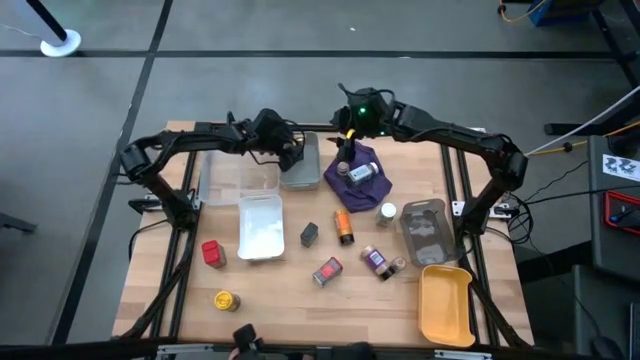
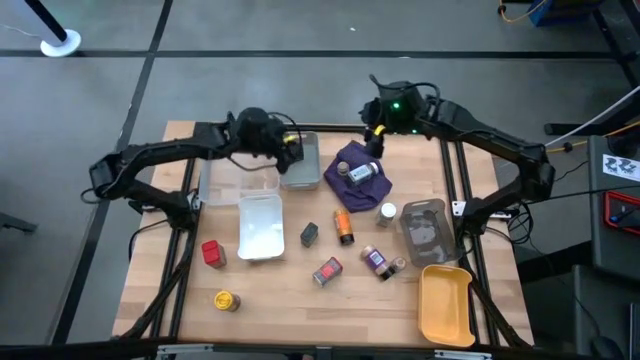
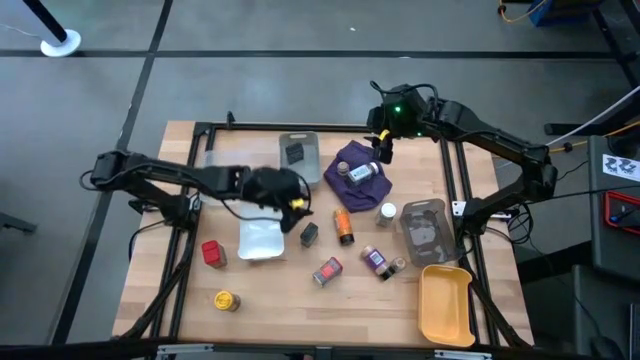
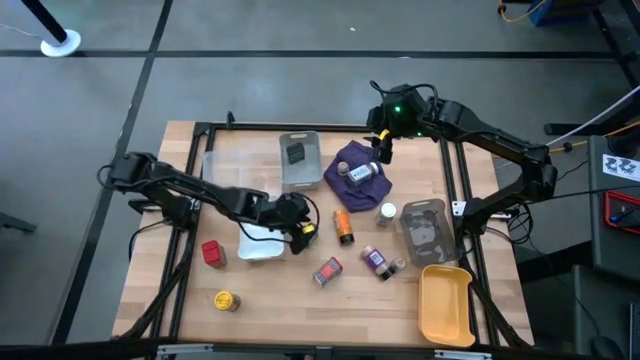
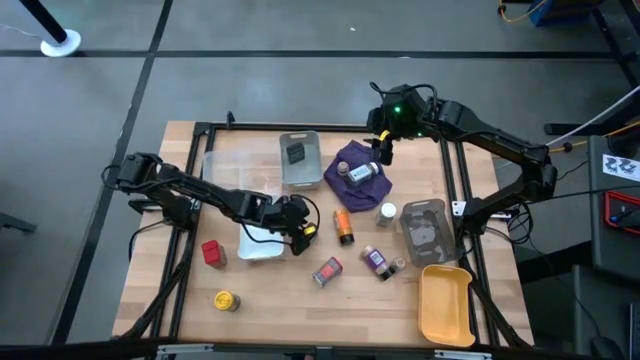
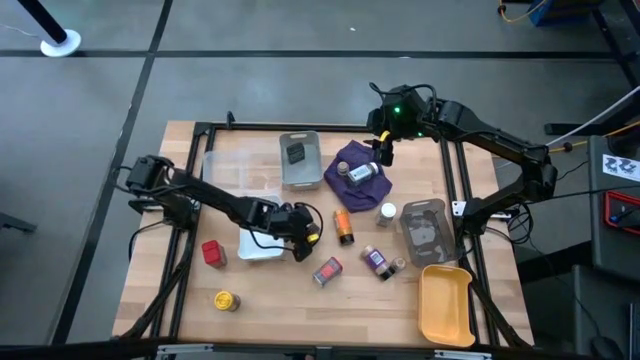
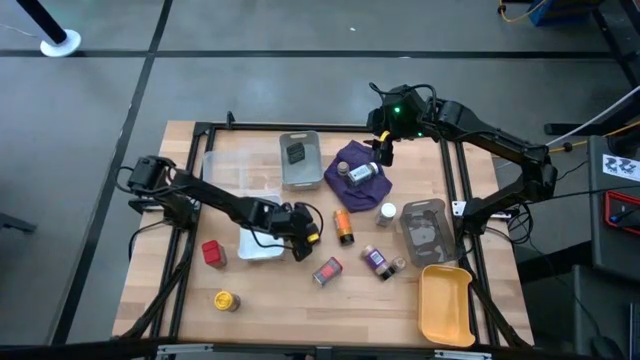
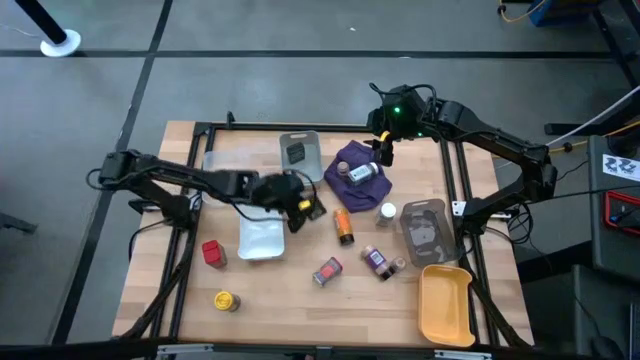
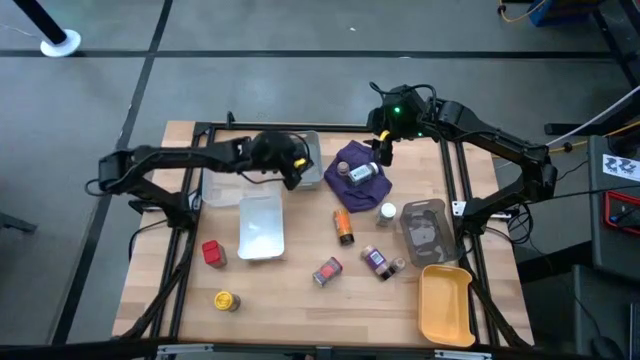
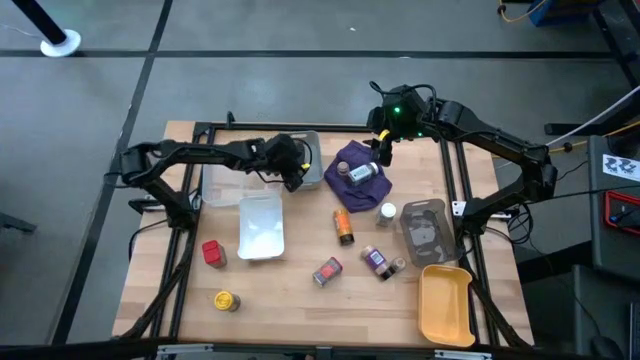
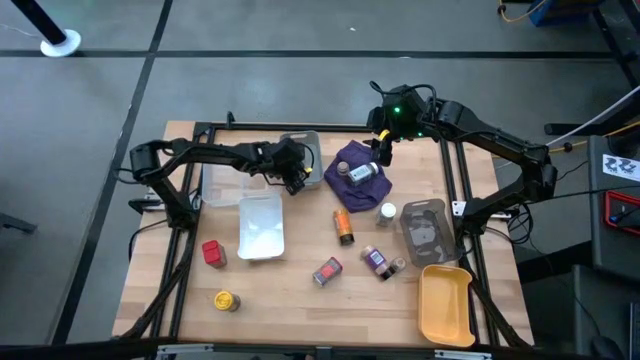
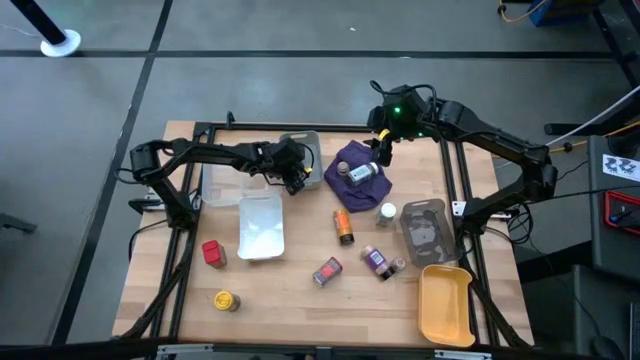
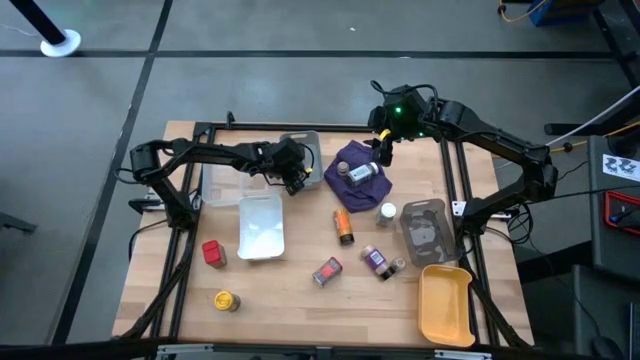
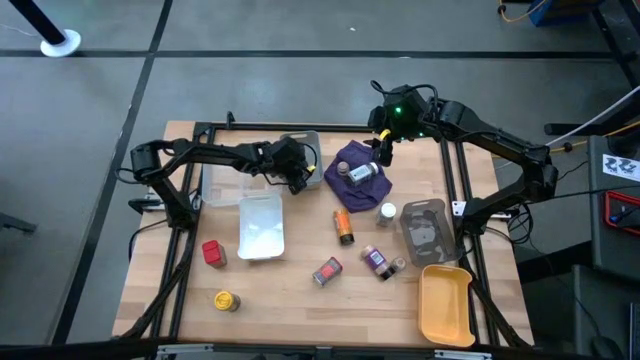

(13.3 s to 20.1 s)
Task: Sort spices by type
Put the black seasoning can into the gray bin

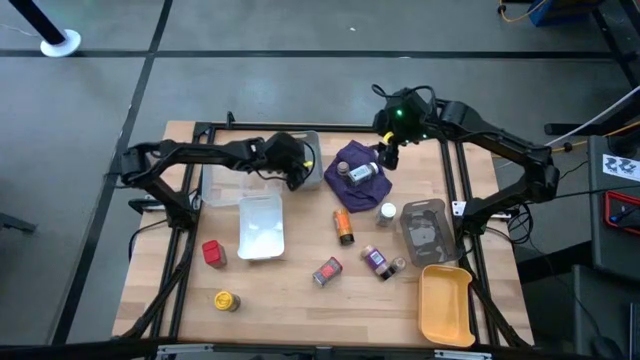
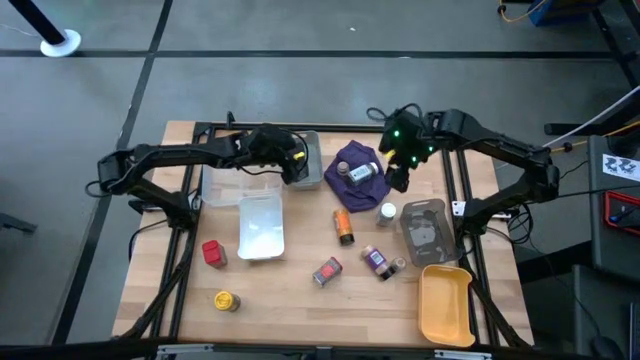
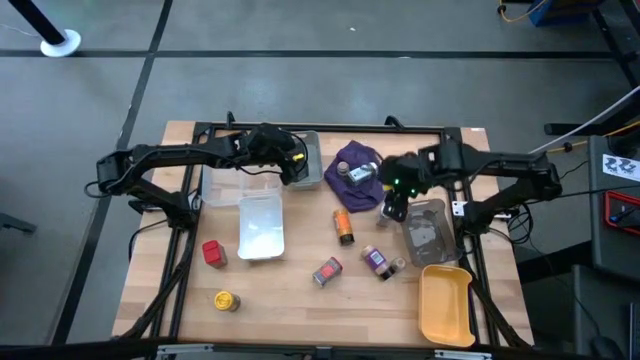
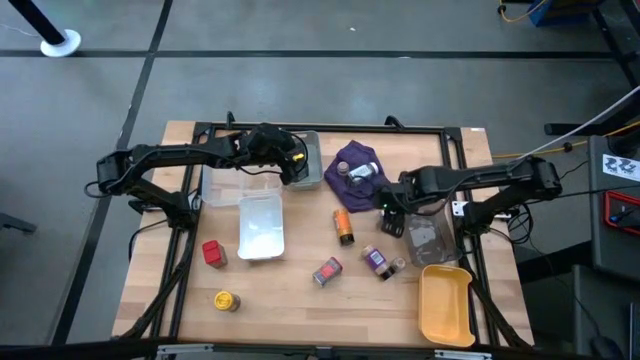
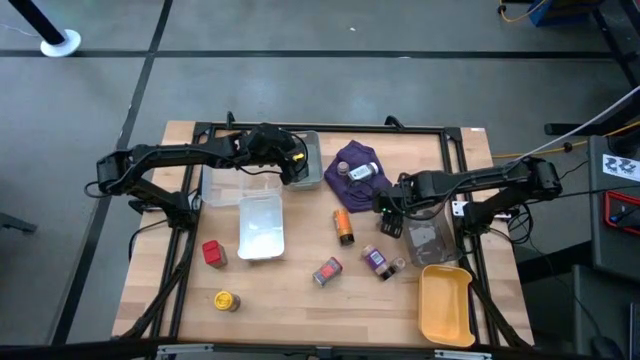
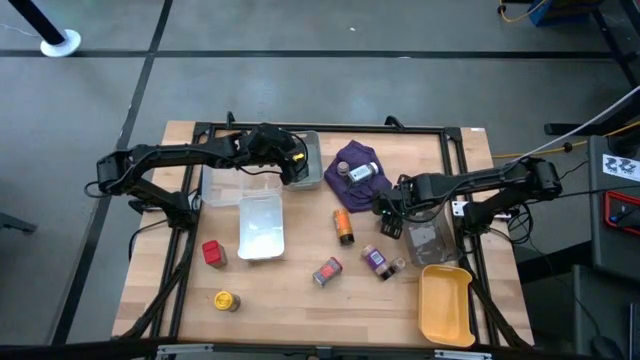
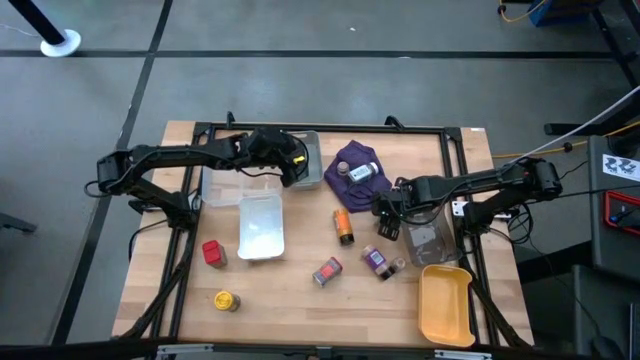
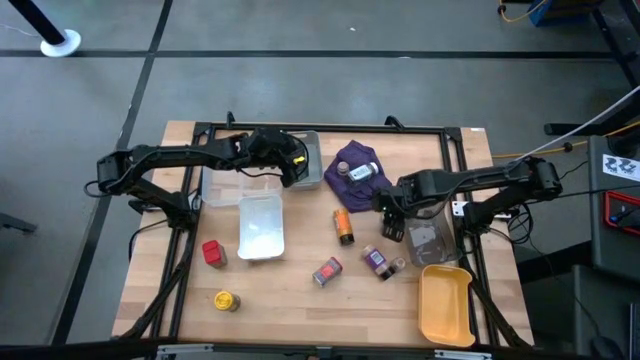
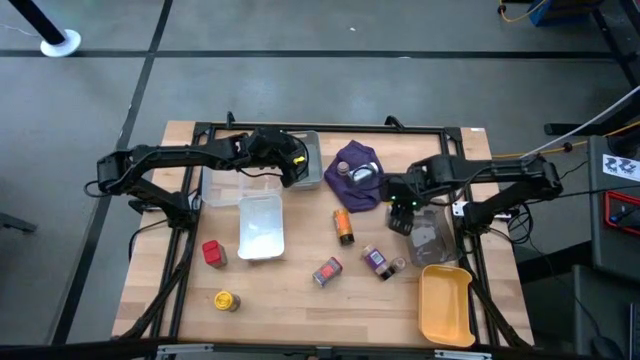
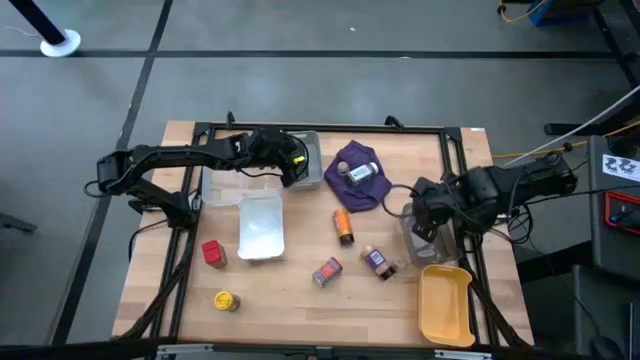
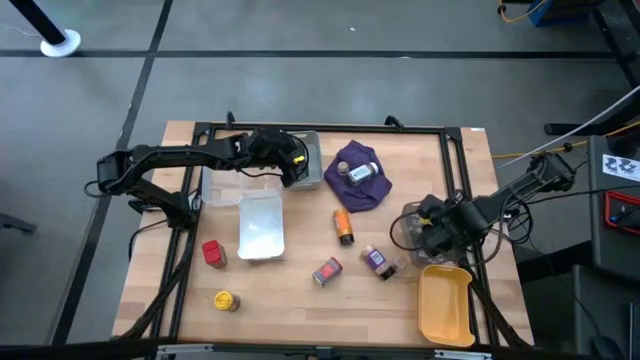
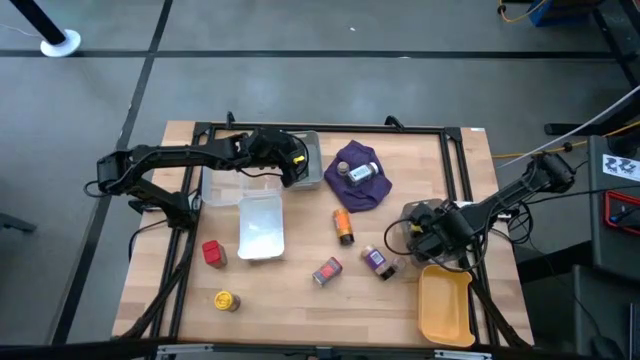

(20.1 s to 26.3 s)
Put the middle right white seasoning bottle into the black transparent bin

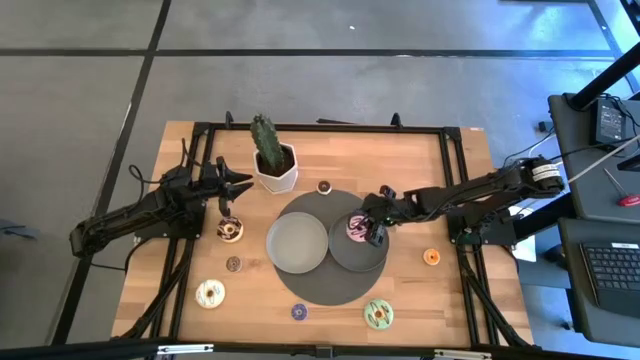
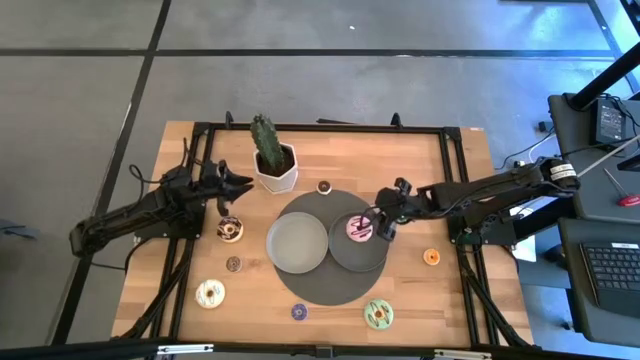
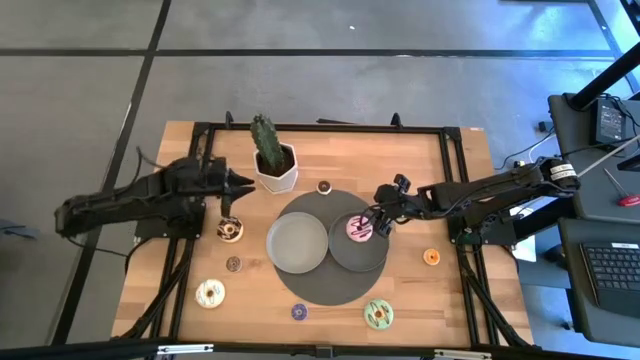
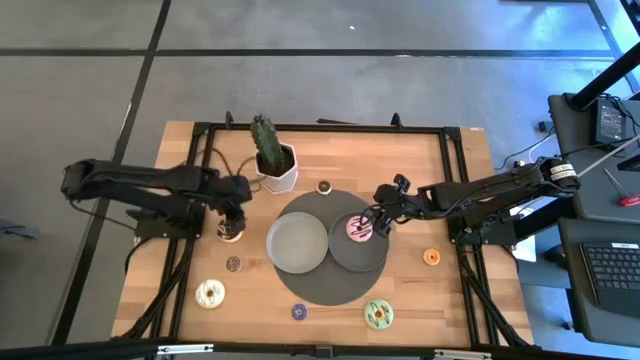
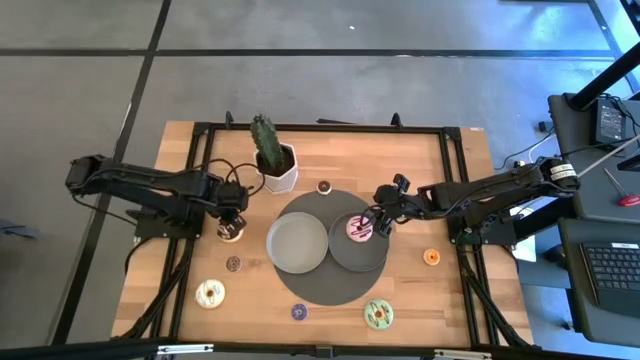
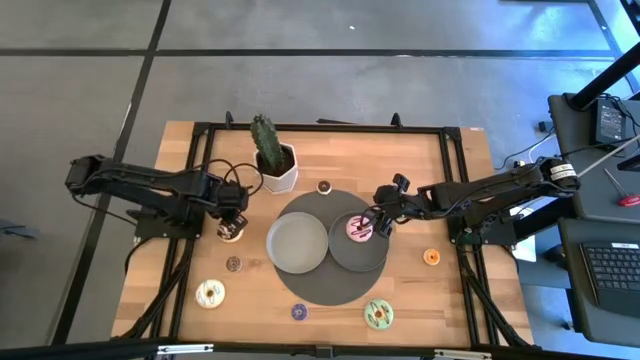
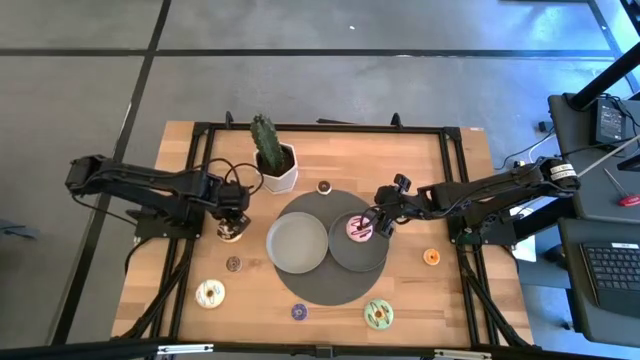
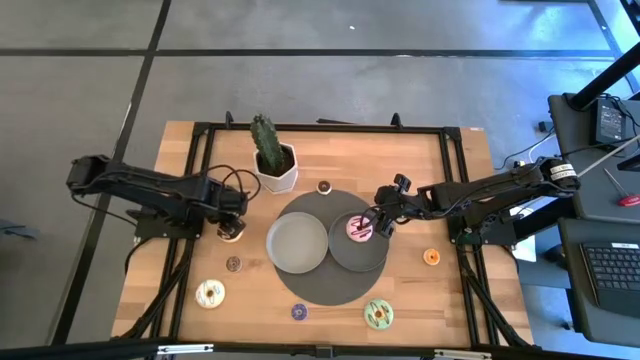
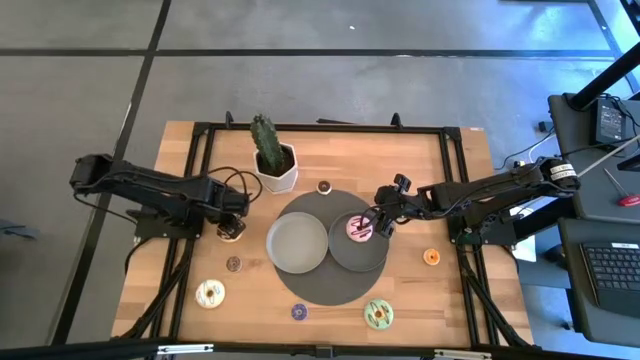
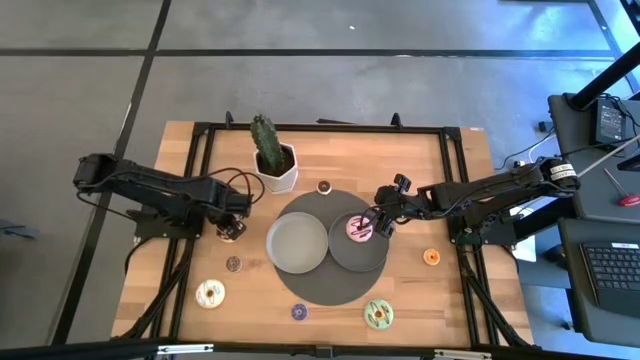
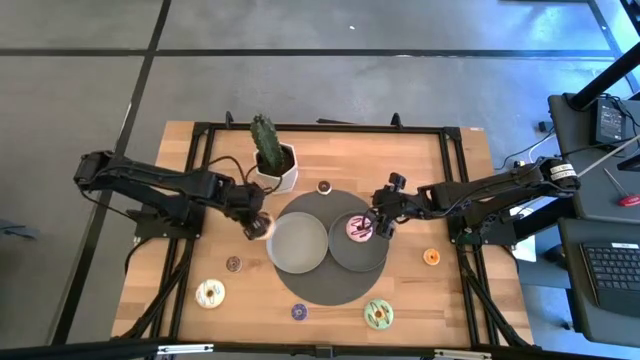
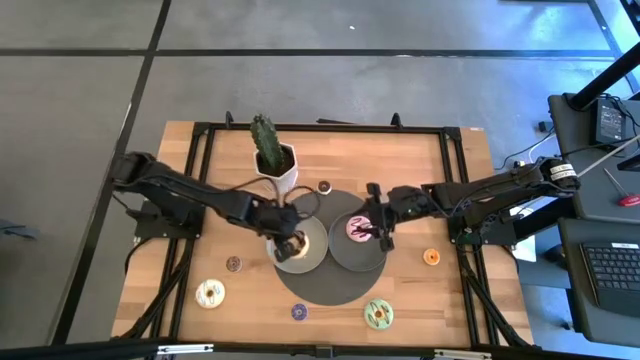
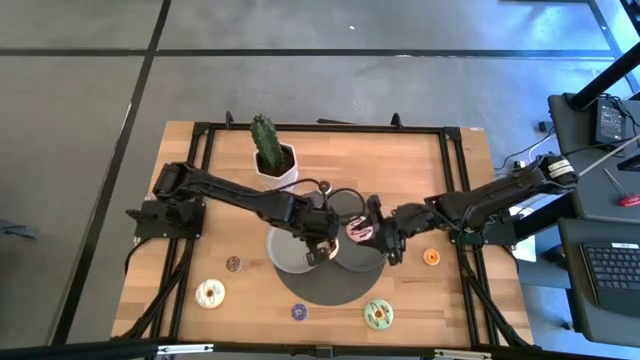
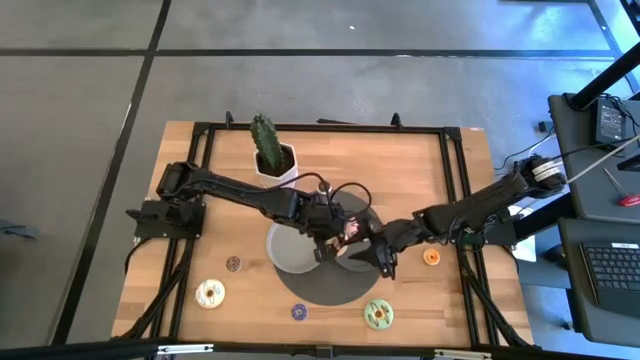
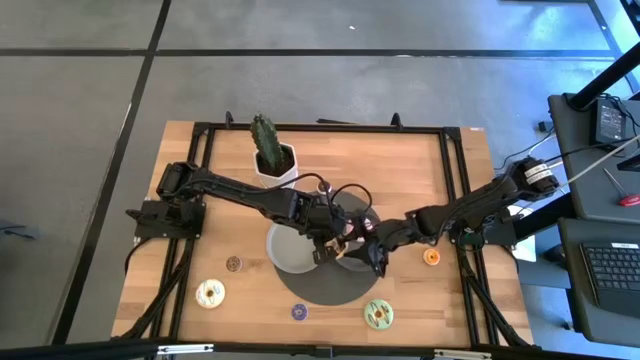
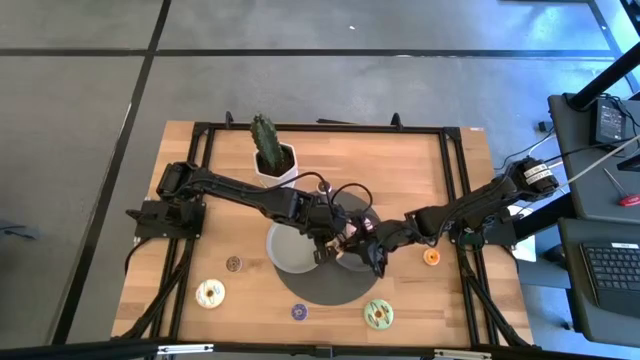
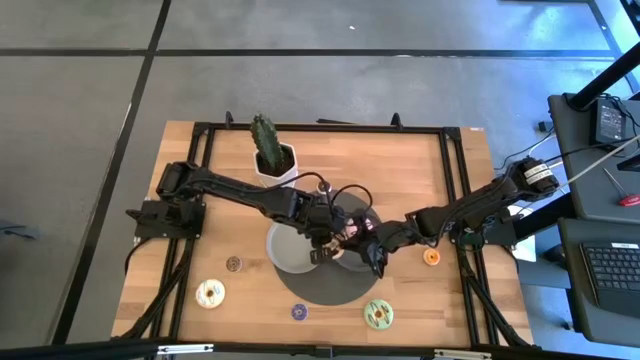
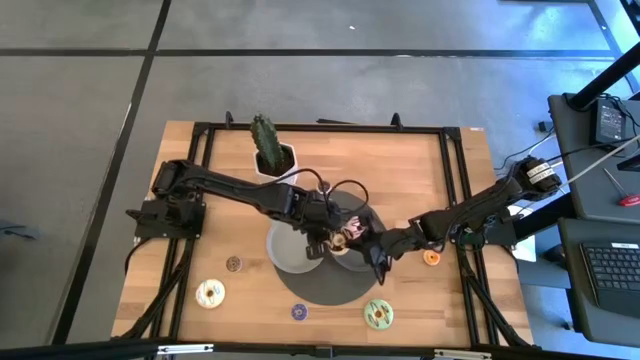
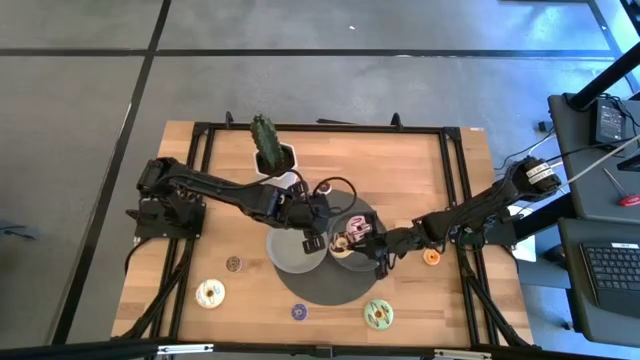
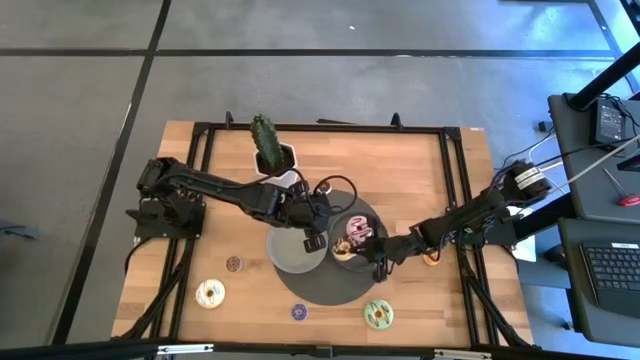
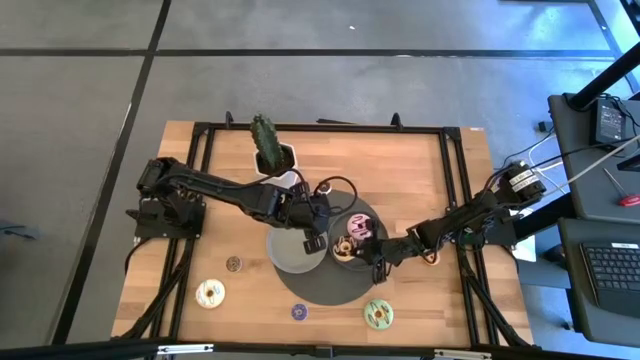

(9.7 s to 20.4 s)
Task: Pick & Place donuts
Put the large black donut on the dark gray plate
